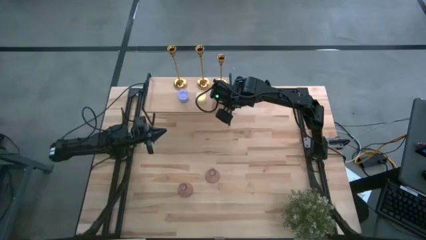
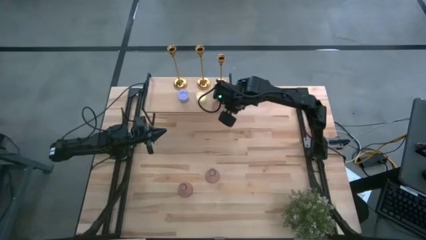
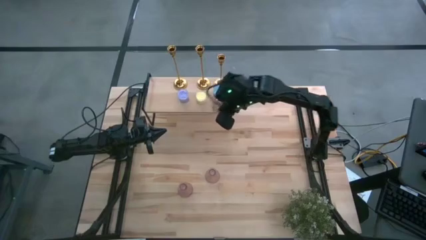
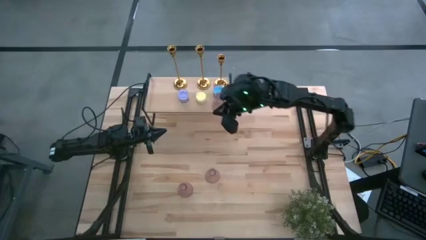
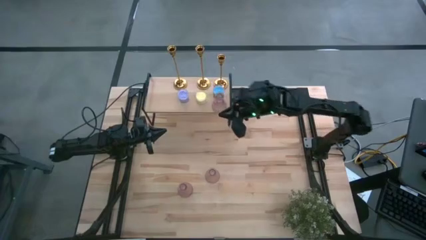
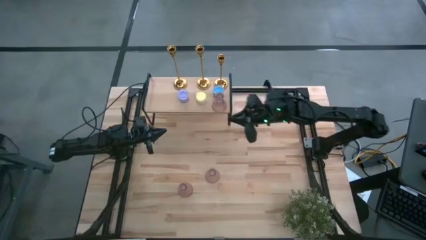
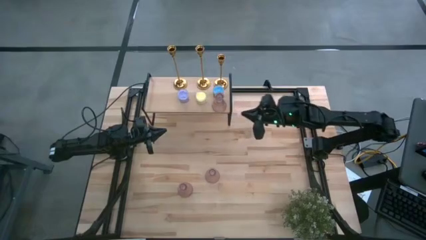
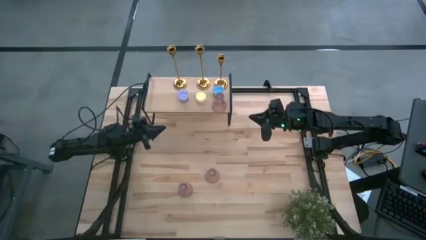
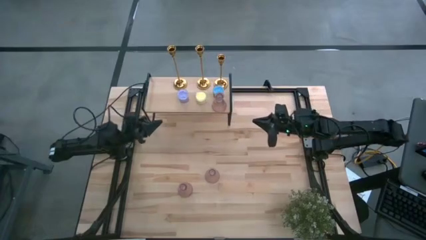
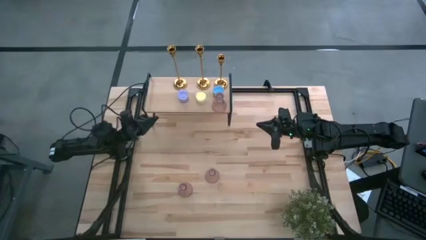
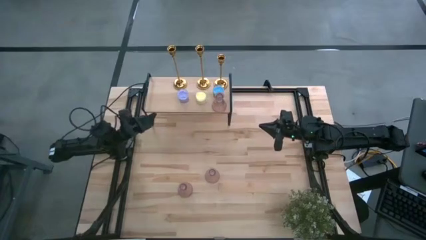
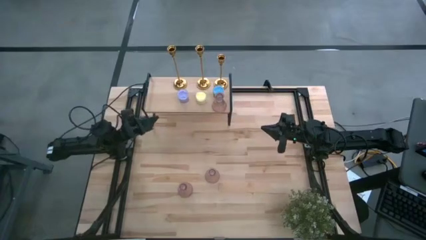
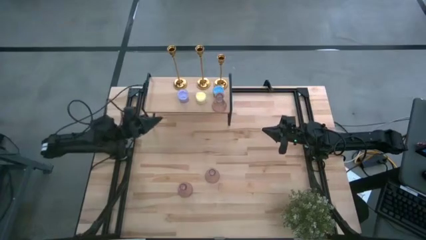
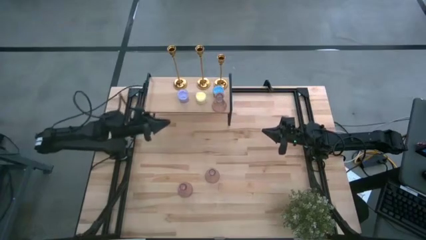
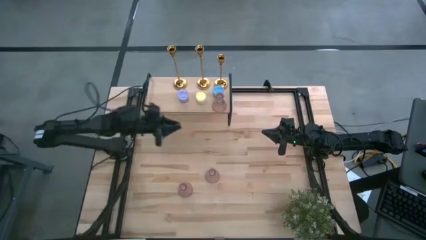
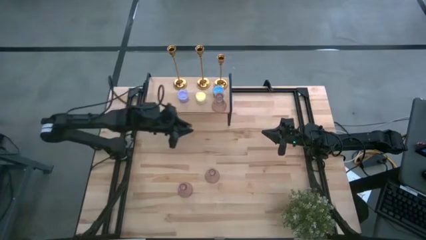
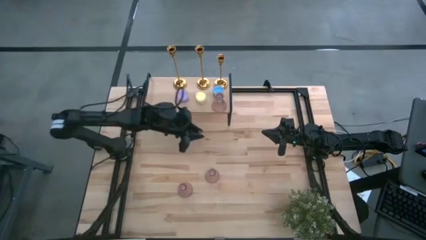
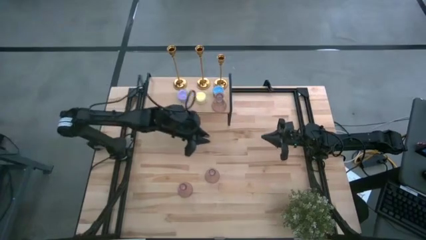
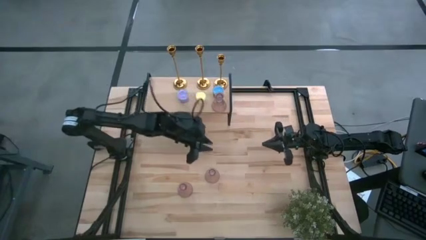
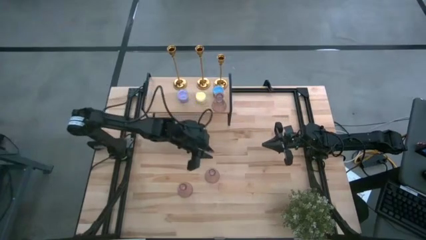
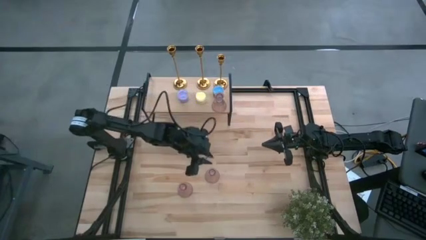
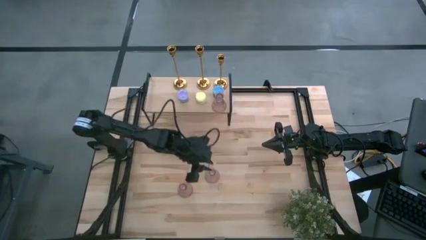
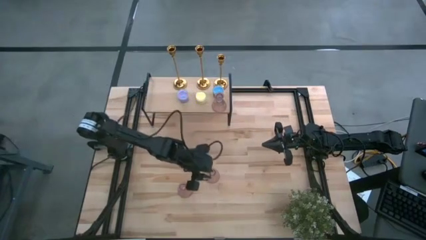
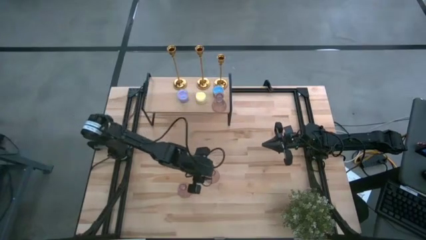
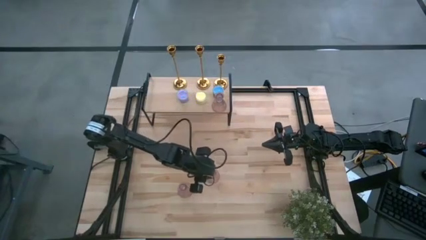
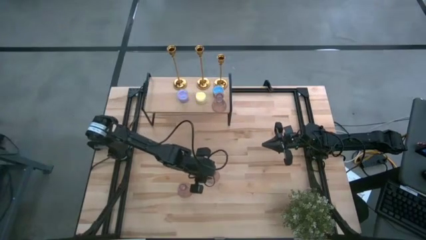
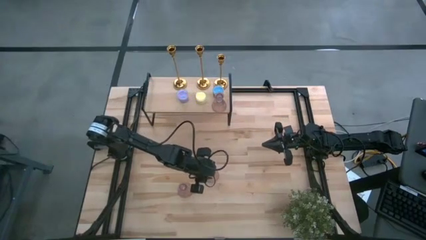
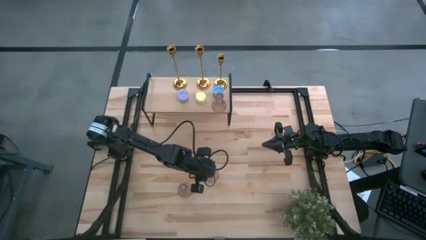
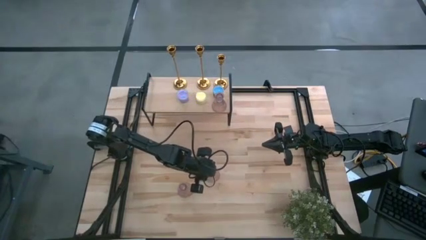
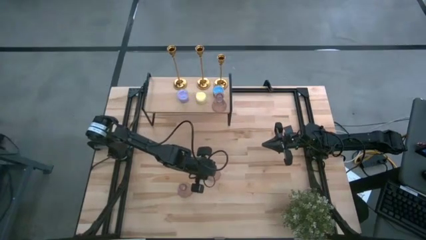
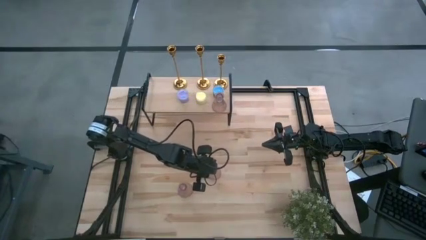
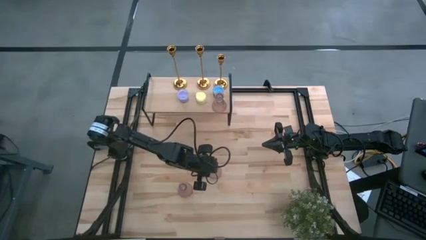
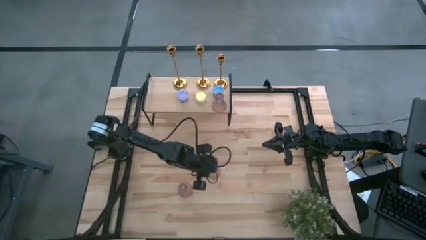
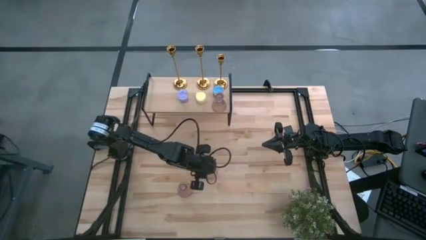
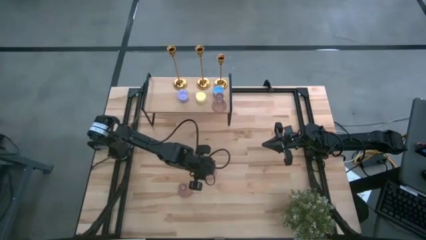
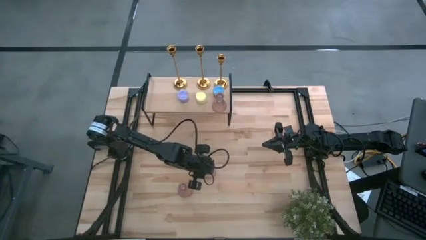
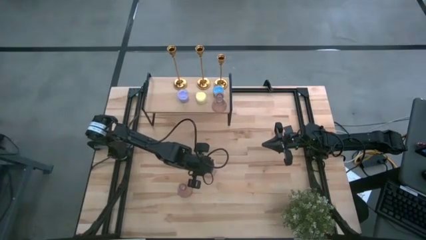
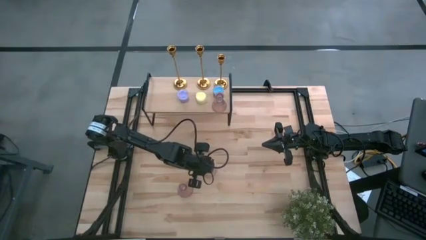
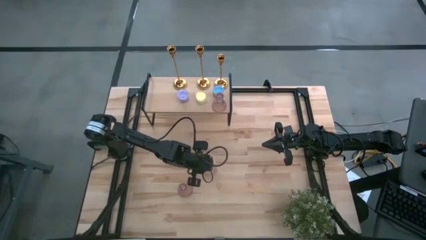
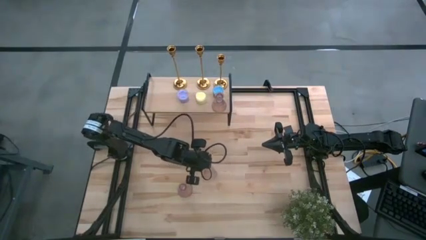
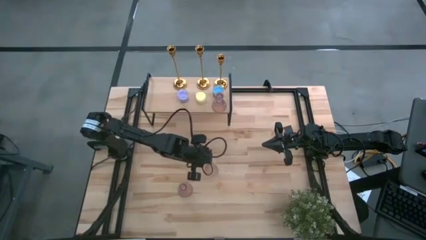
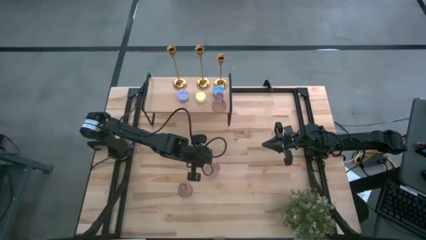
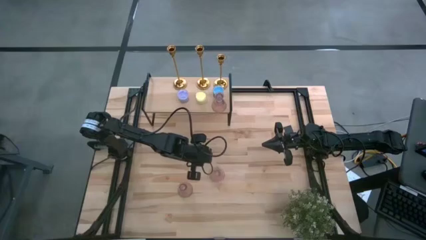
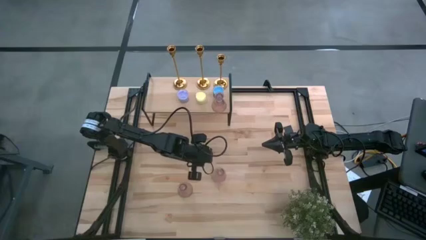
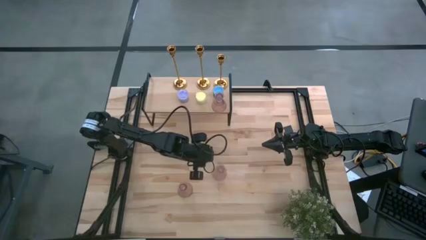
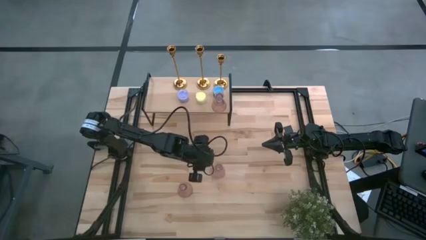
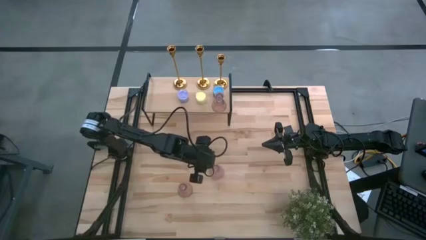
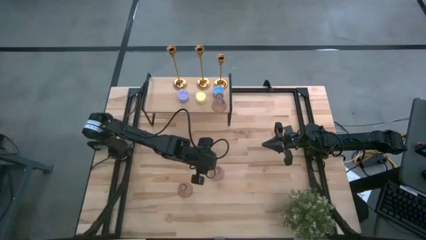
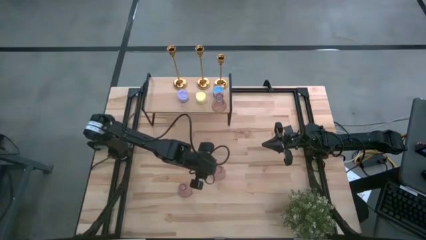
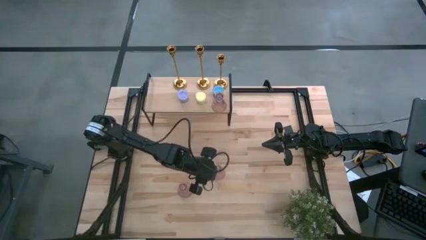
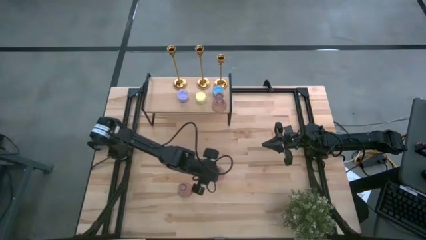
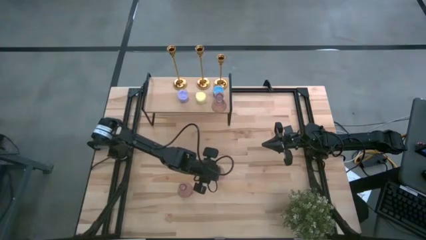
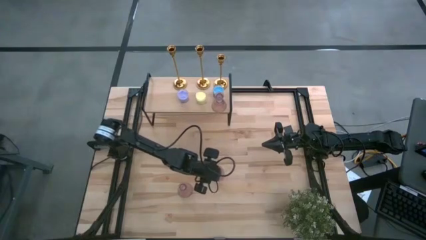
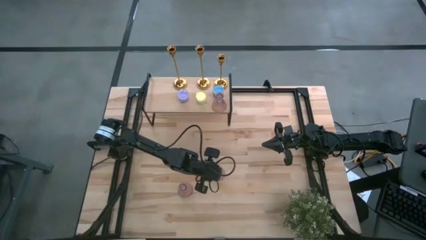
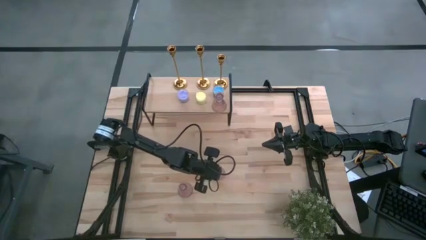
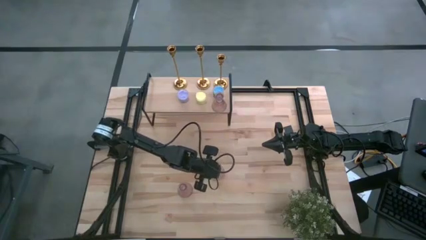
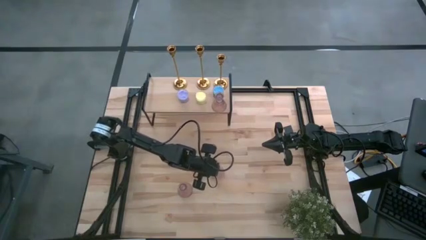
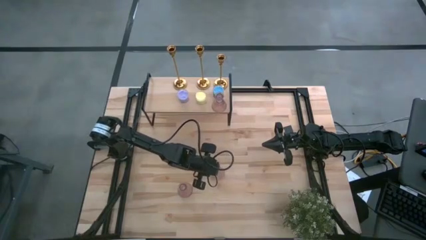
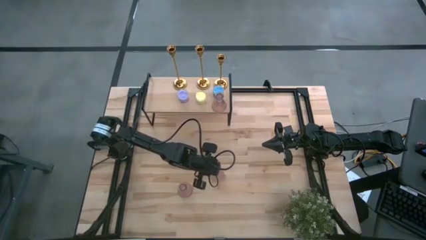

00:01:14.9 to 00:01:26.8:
Task: Pick & Place candle stick holders
Put the right pink candle holder on the shelf aligned with the pink candle holder

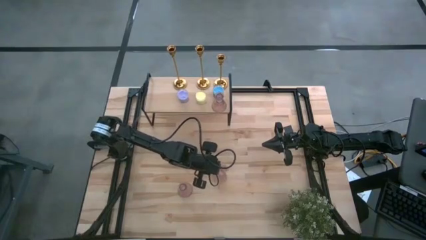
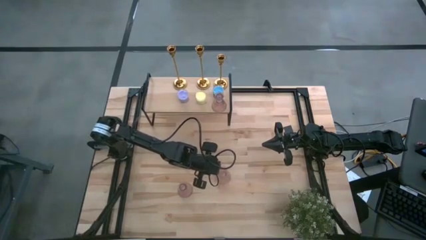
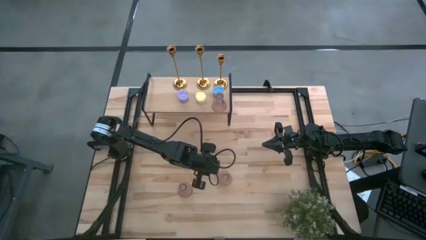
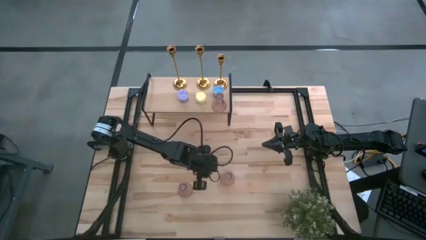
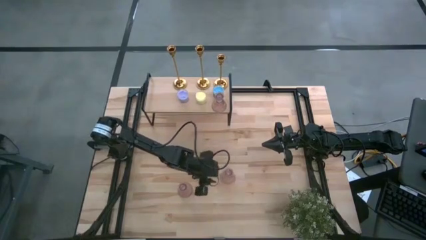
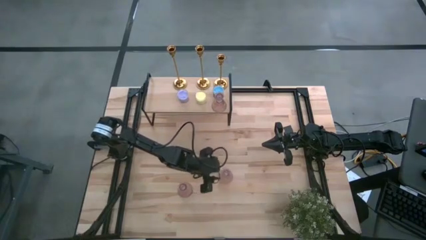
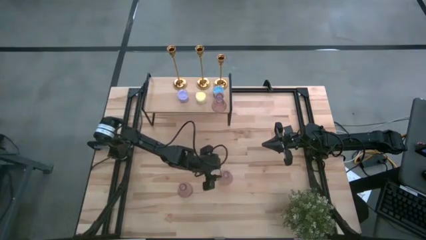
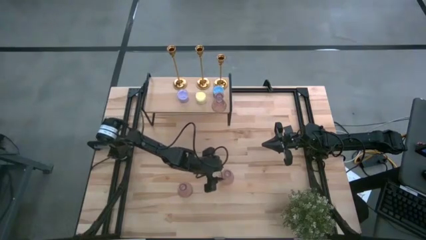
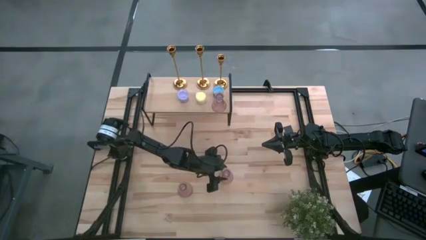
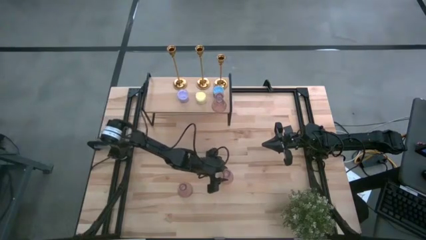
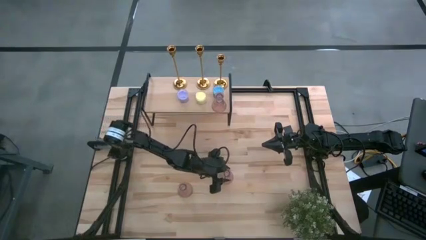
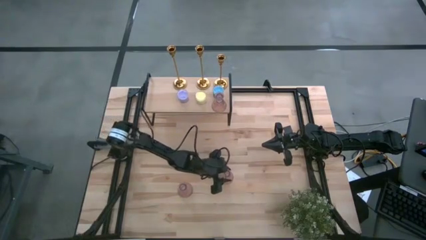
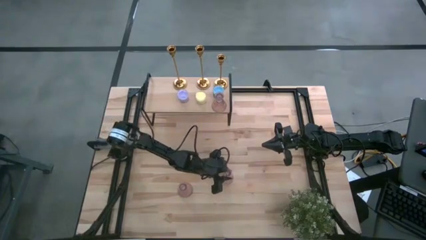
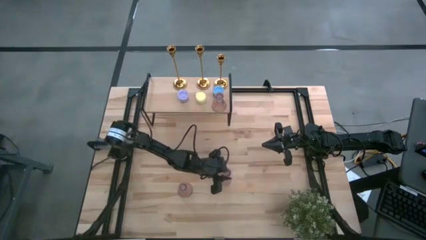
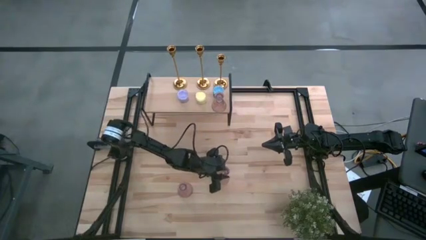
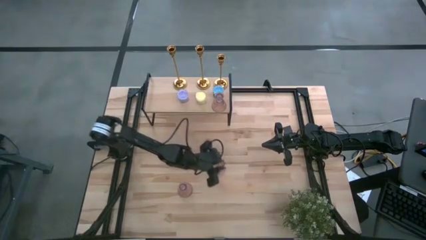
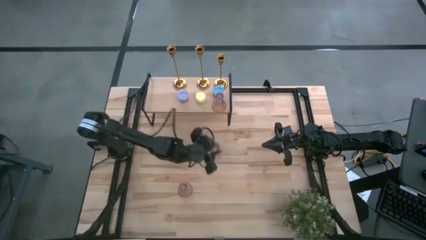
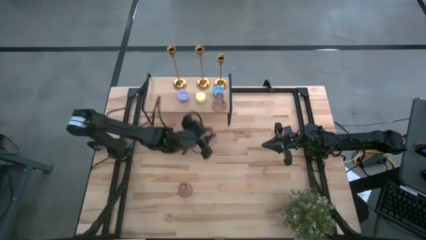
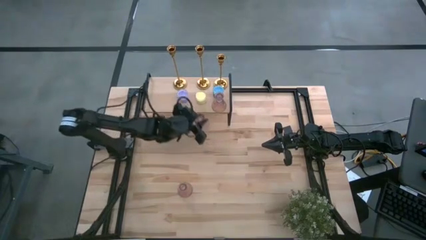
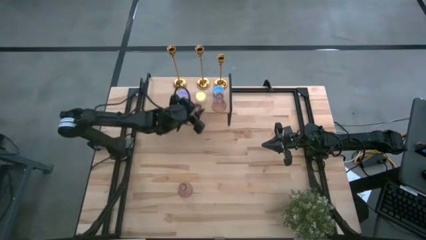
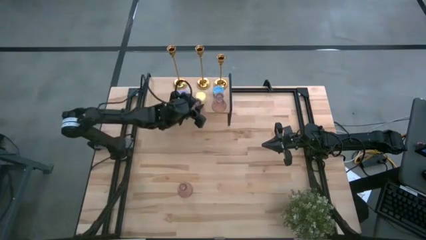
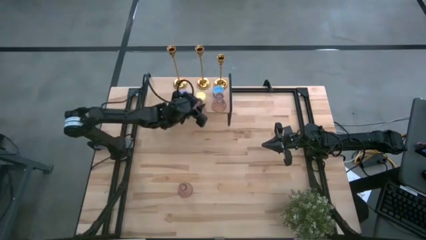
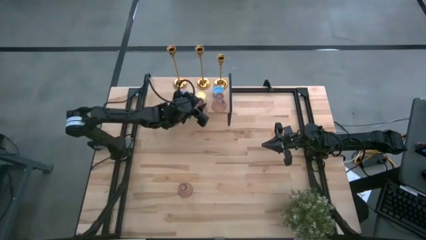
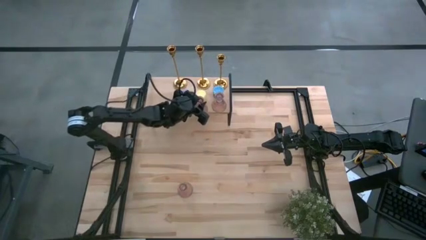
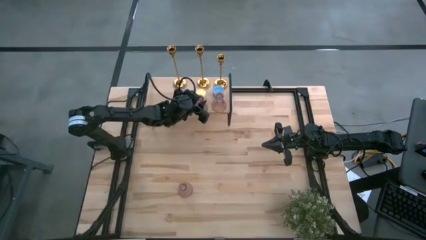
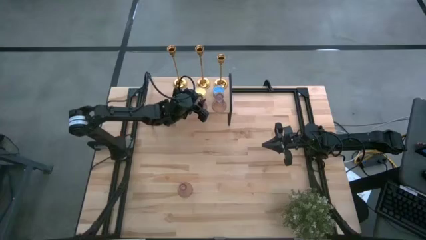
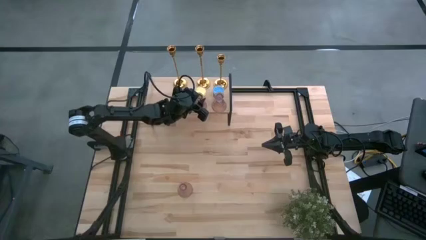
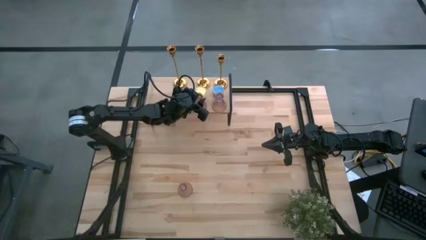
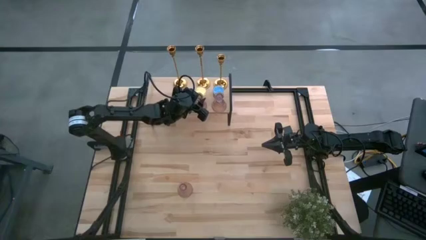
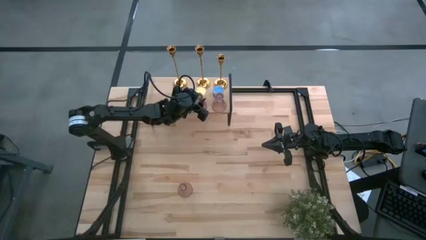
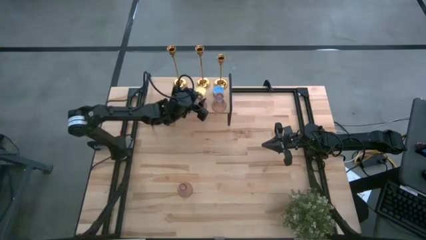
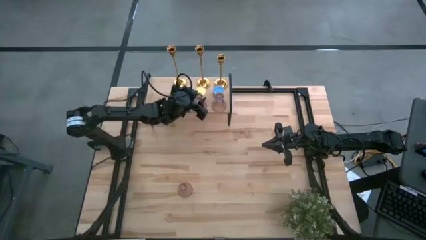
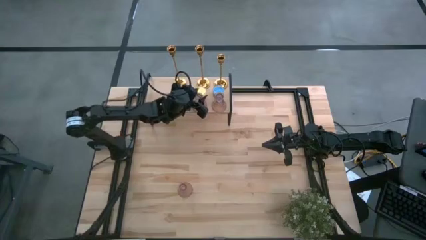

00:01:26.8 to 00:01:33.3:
Put the right pink candle holder on the shelf aligned with the pink candle holder
